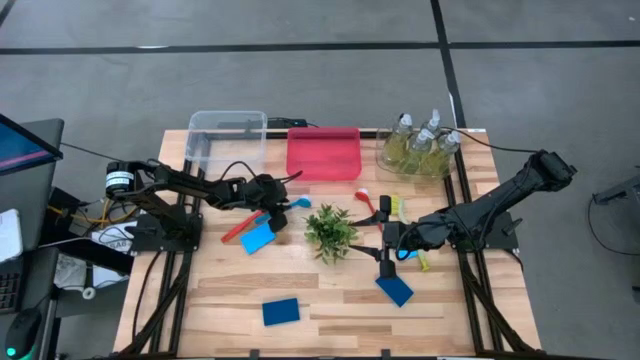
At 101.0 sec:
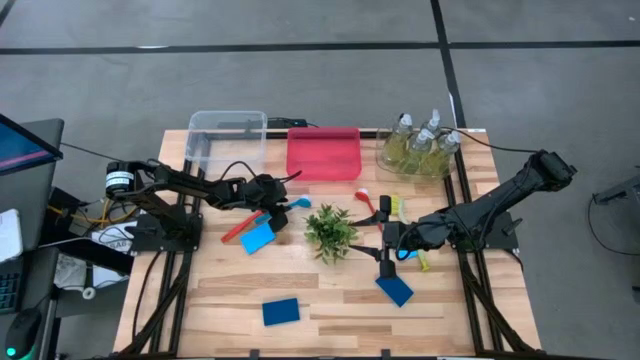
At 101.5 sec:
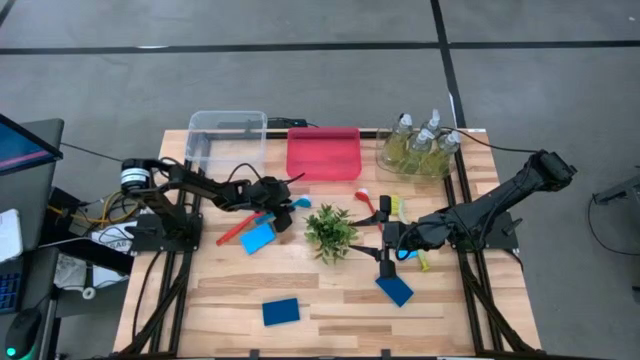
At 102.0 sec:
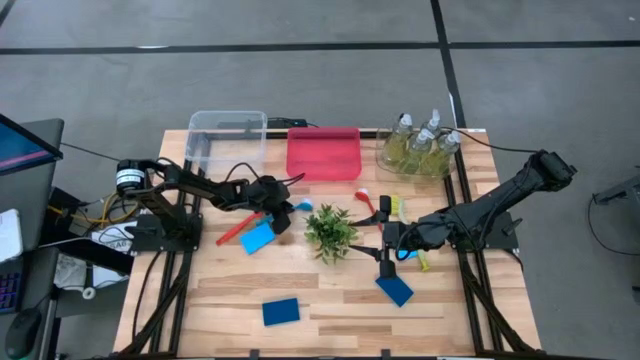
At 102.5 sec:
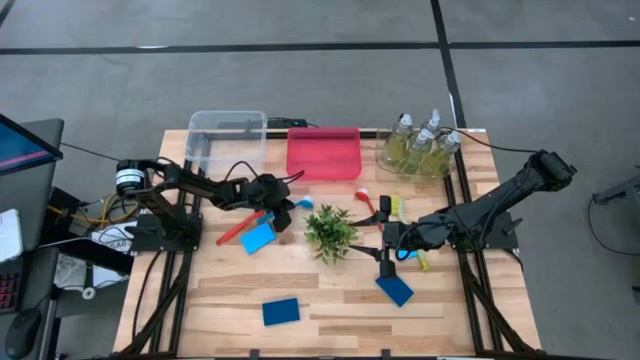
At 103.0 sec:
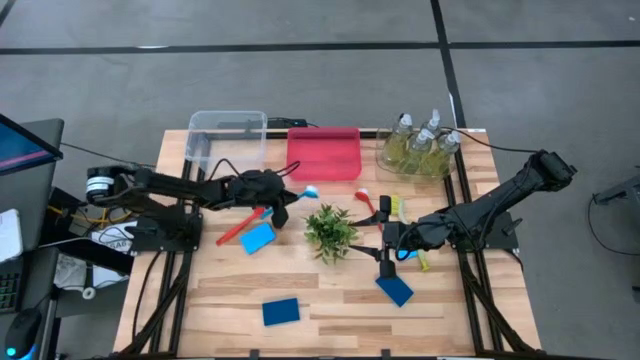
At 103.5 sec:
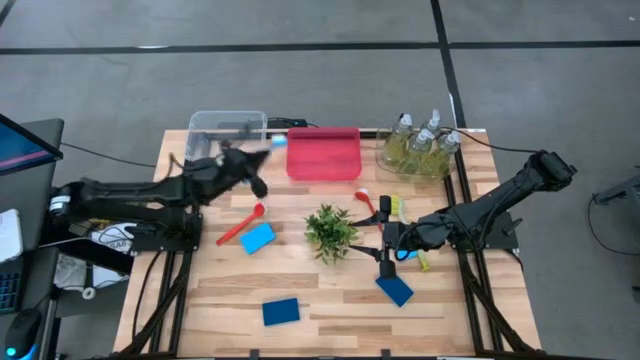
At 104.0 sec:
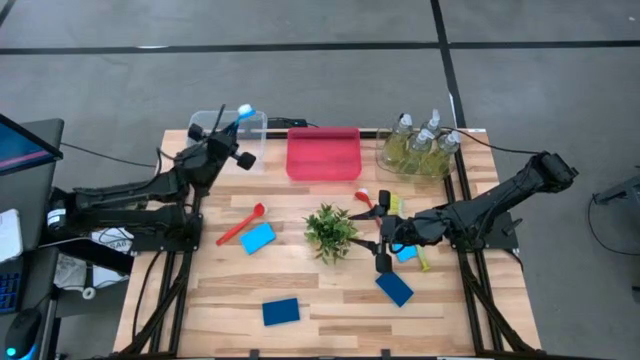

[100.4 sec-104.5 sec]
Task: Pick & Place Kitchen Sink Supplies
Put the blue dish brush into the left transparent bin

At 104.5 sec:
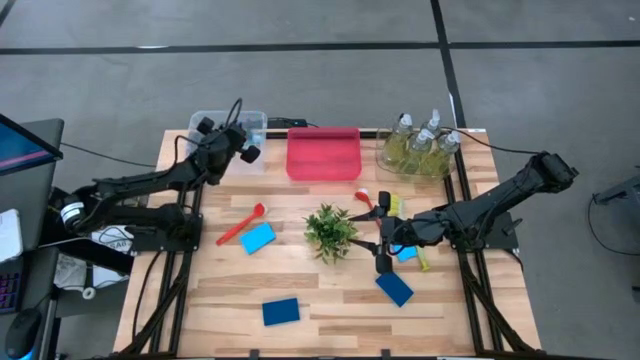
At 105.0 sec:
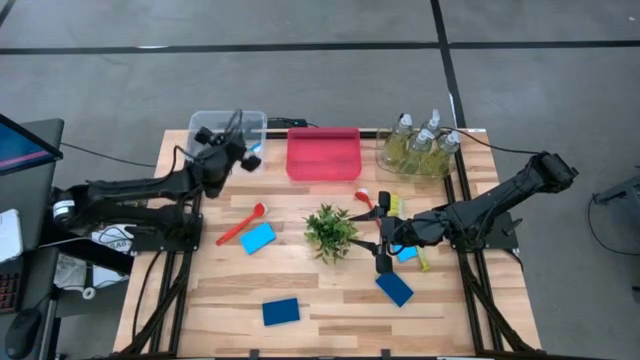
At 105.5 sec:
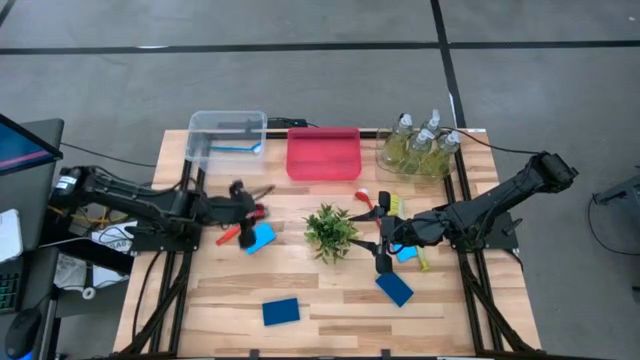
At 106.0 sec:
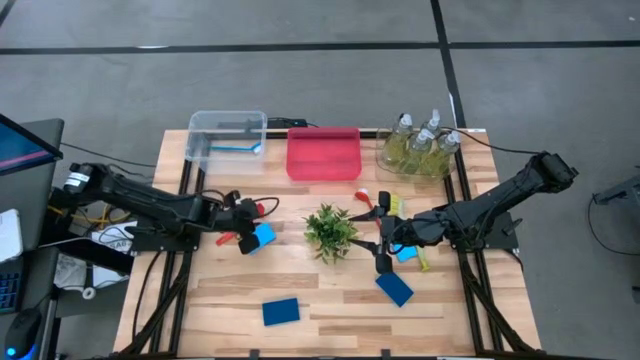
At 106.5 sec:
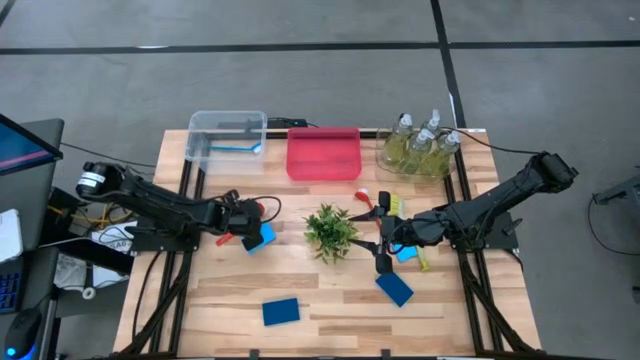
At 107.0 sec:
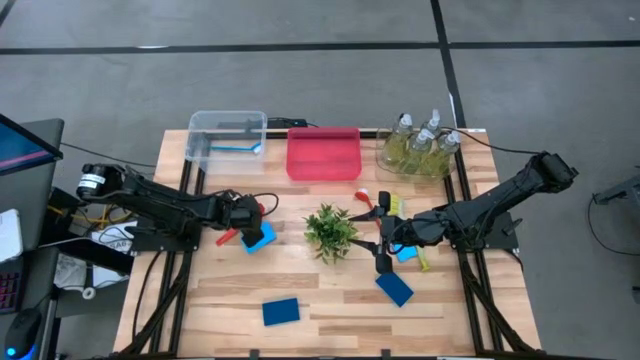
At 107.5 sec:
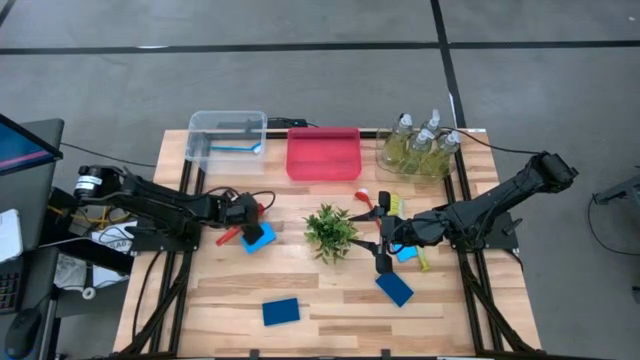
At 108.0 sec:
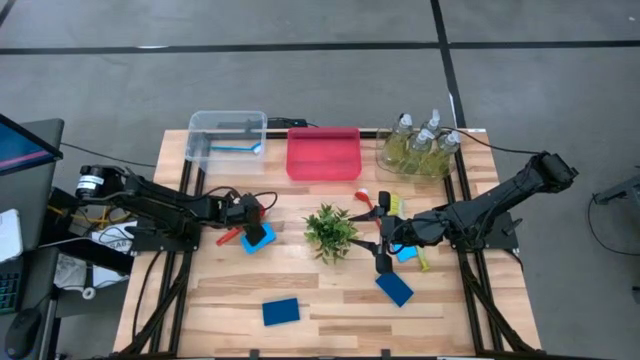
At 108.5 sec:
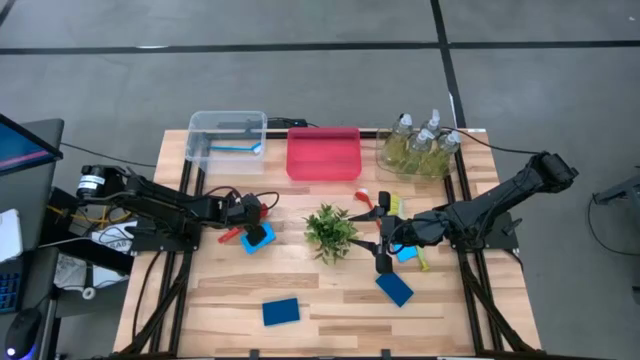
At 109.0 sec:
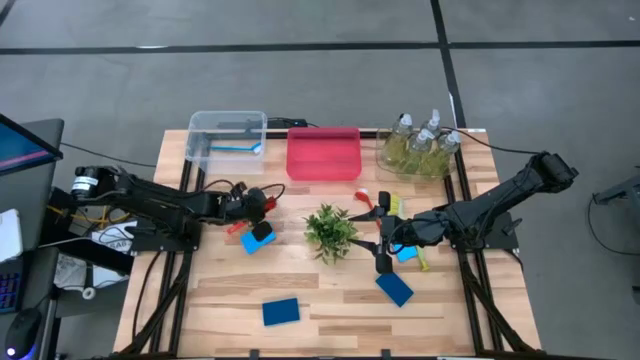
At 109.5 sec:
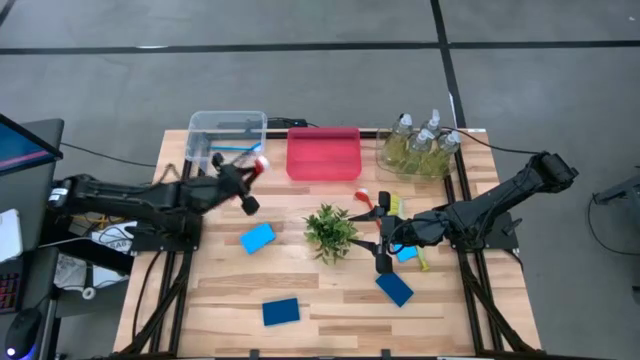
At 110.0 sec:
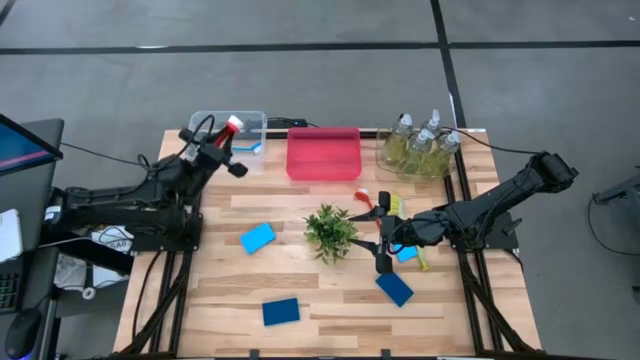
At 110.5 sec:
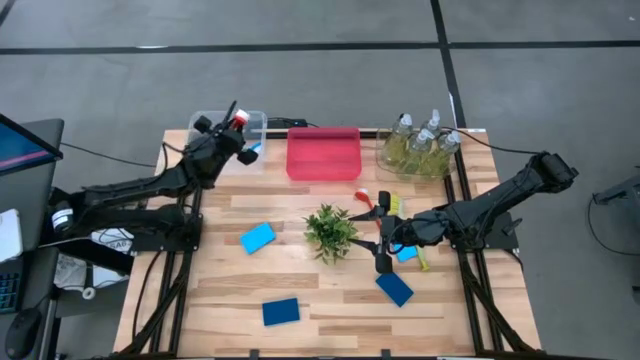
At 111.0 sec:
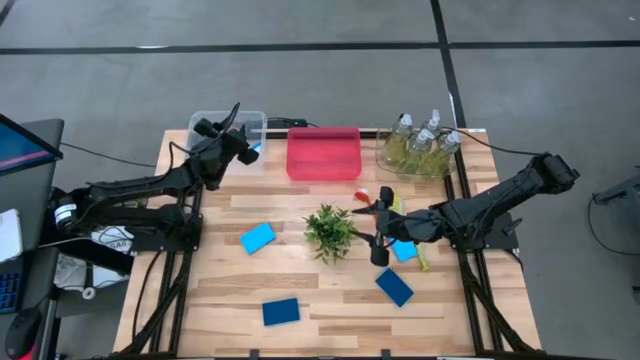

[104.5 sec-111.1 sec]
Put the red dish brush into the left transparent bin

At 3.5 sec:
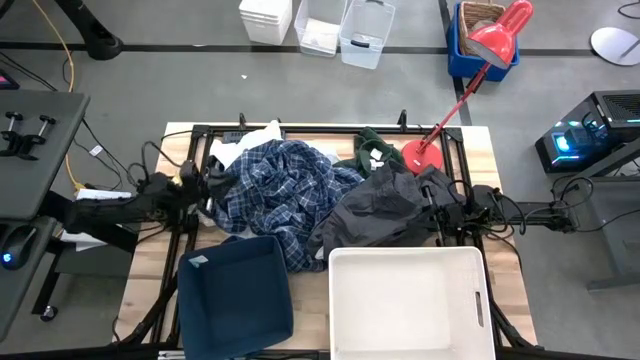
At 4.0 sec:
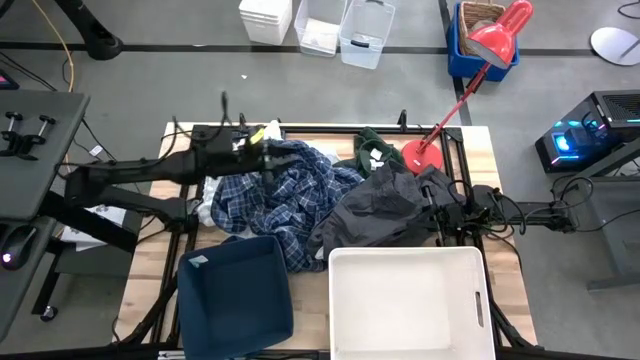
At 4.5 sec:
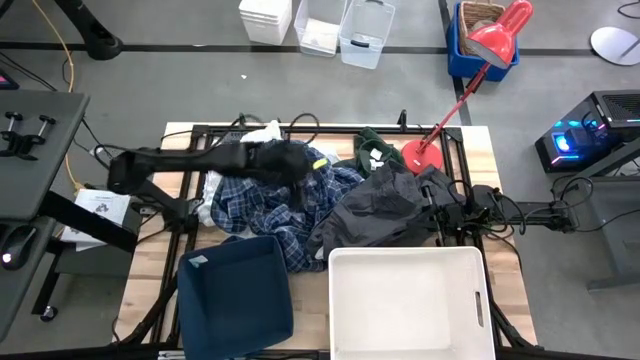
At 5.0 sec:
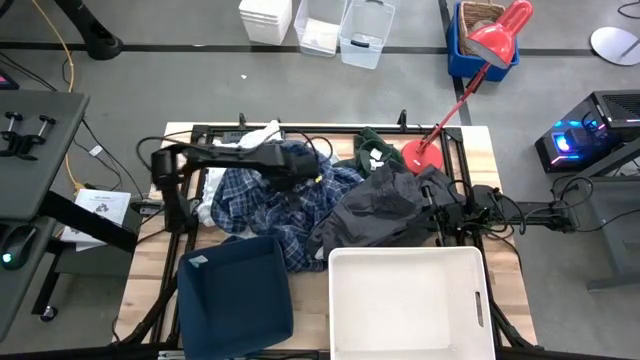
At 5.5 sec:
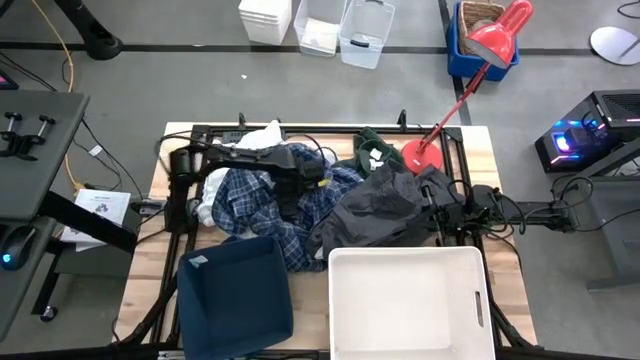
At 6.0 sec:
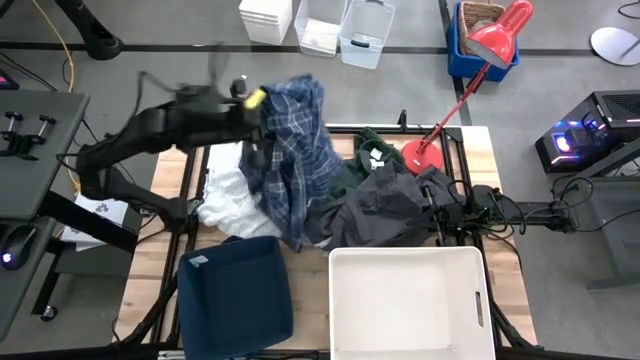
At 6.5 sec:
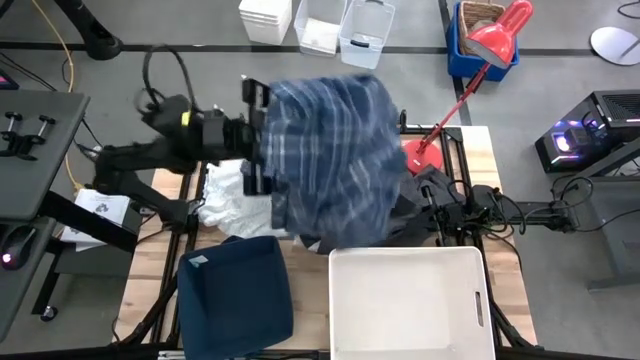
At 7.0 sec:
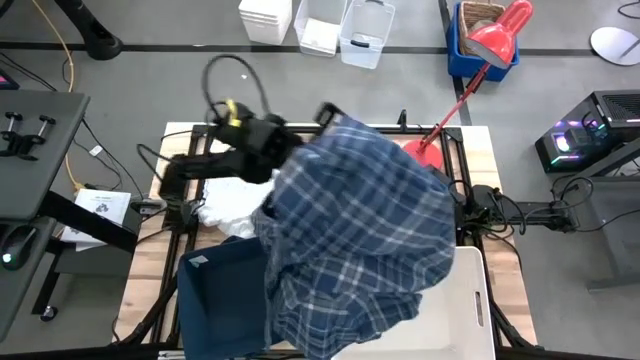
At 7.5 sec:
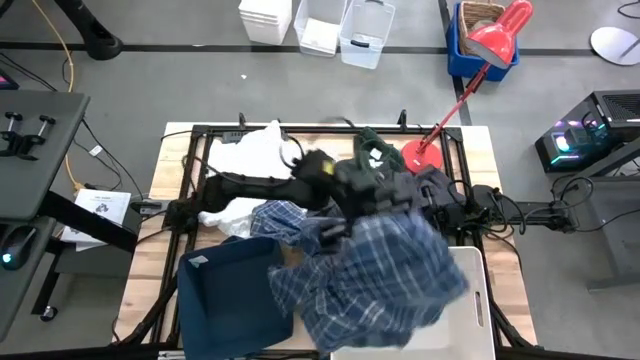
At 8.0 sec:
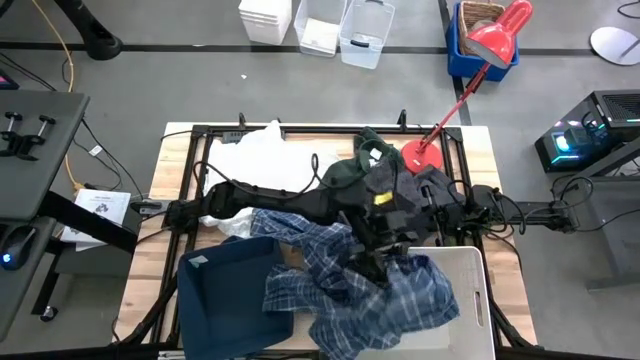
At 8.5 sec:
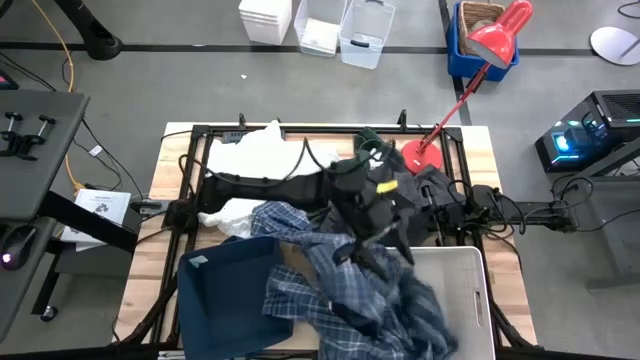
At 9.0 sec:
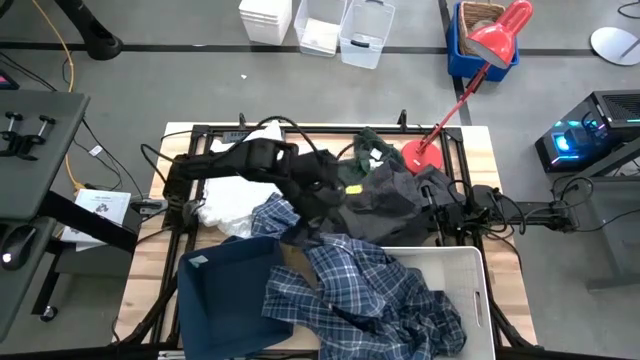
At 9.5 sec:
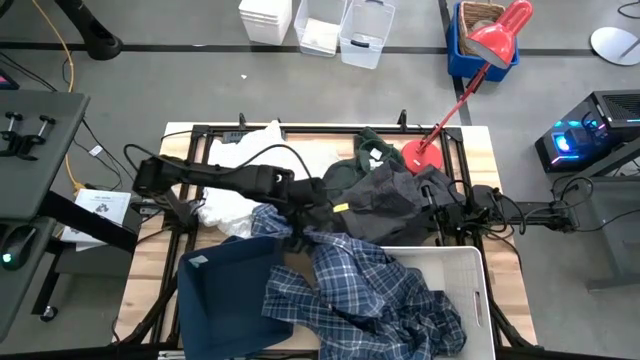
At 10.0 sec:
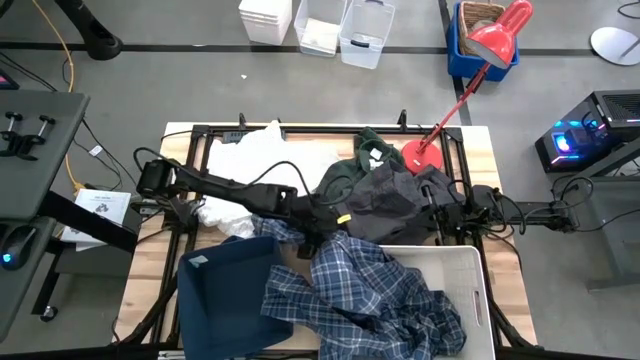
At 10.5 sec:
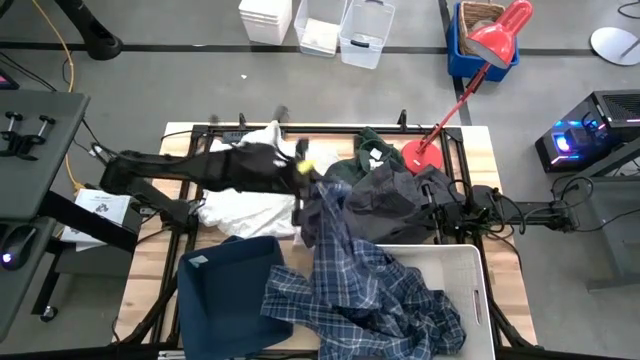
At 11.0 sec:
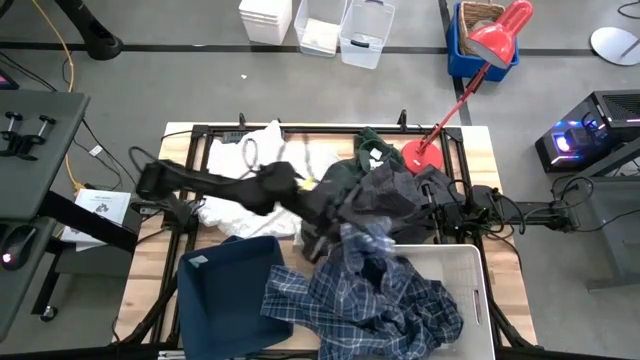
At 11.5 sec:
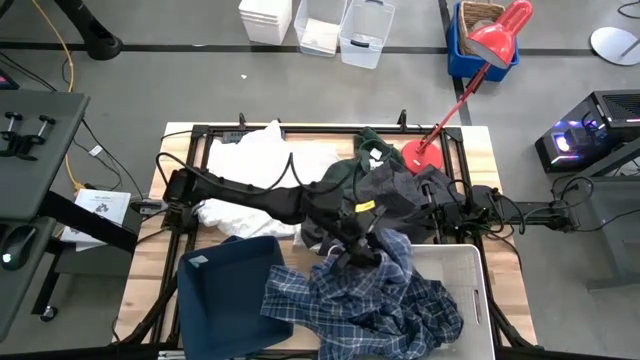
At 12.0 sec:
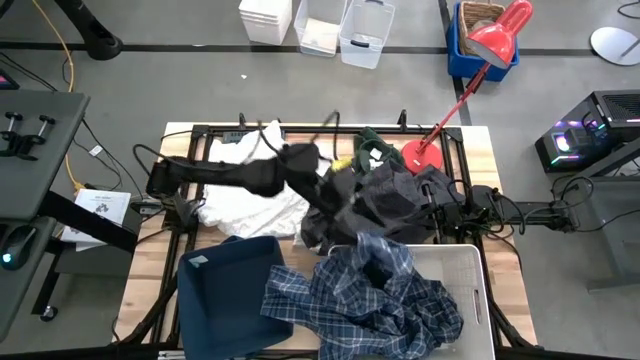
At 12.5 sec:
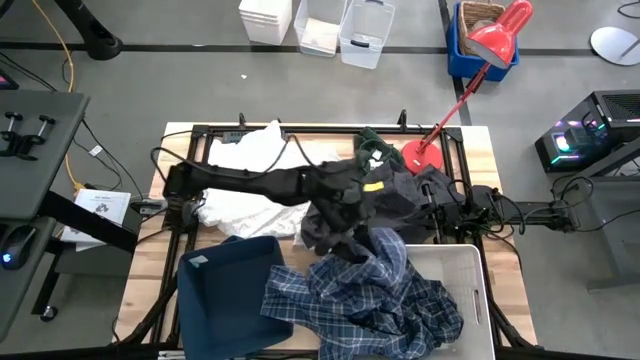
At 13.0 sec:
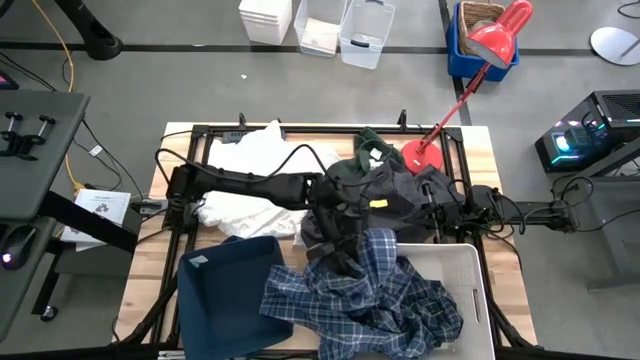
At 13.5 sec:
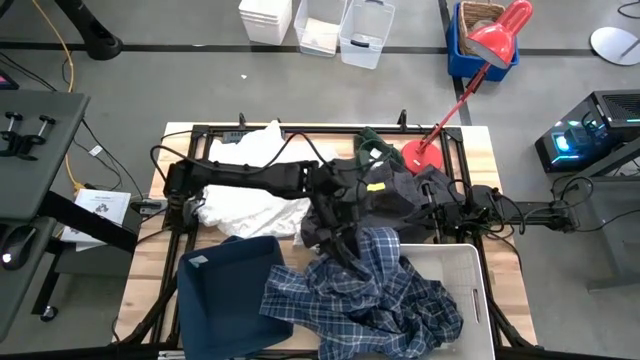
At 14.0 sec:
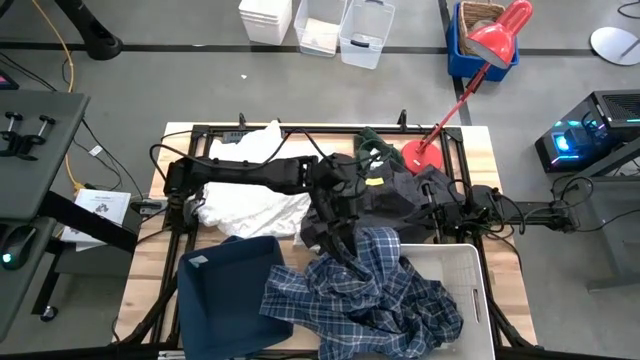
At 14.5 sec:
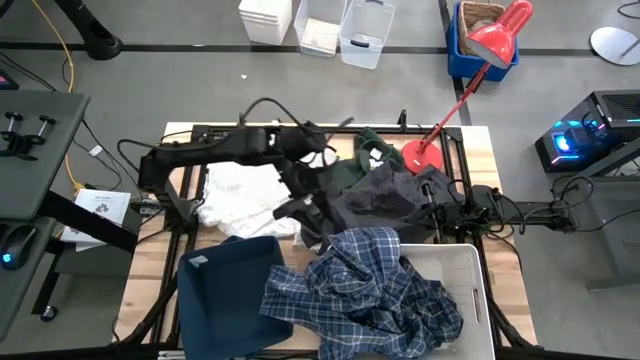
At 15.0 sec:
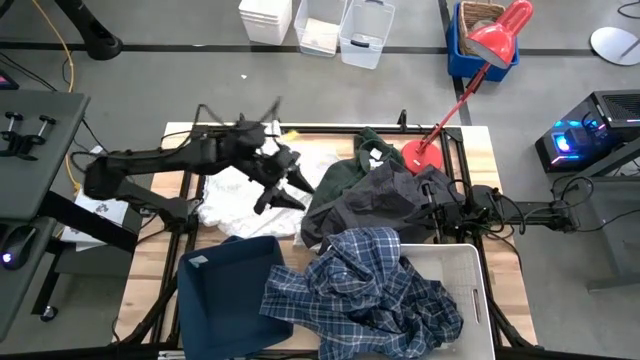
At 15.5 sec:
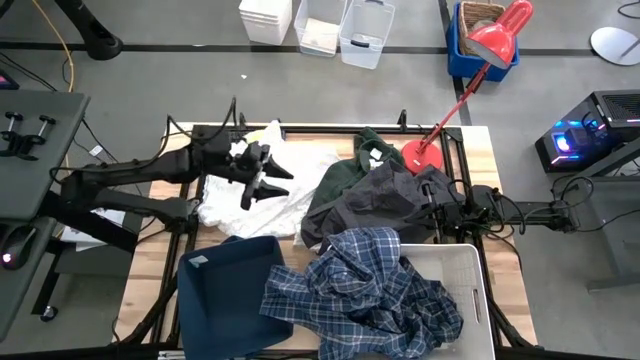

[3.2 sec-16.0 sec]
Task: Sort clothes
Put the blue checkered long-sleeve shirt into the white laundry bin
